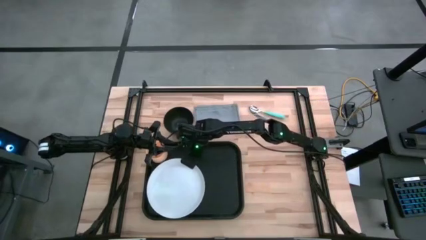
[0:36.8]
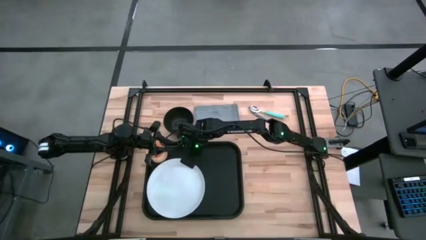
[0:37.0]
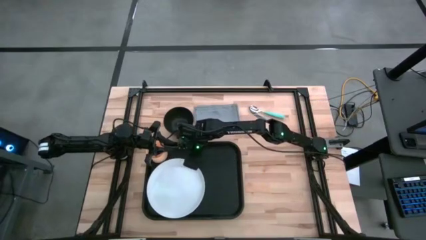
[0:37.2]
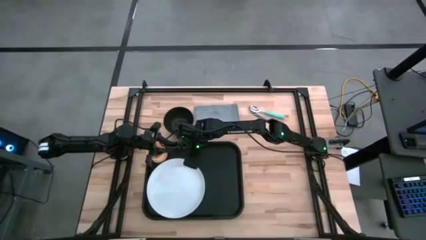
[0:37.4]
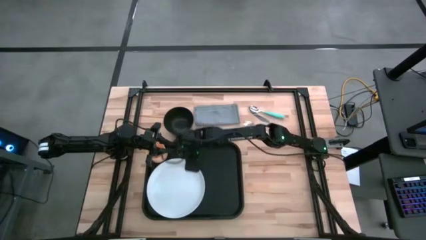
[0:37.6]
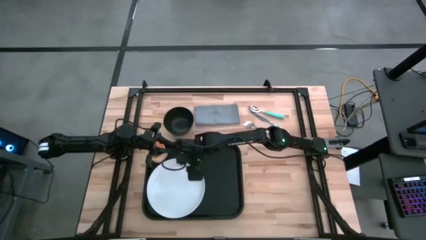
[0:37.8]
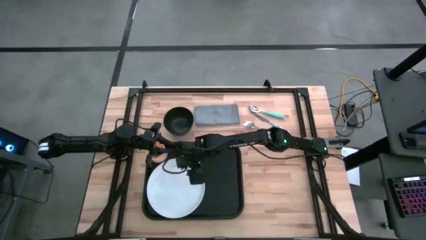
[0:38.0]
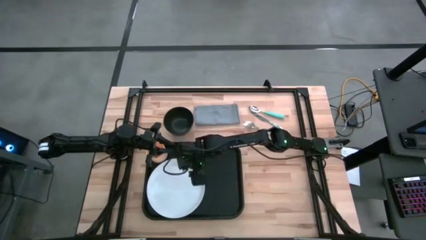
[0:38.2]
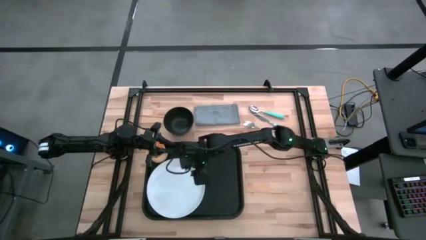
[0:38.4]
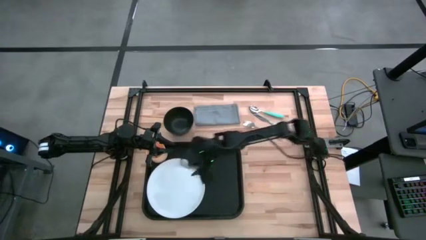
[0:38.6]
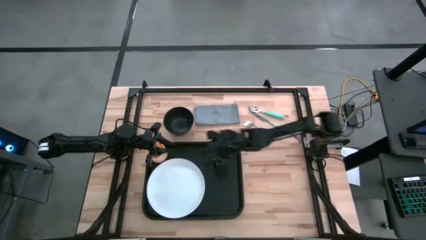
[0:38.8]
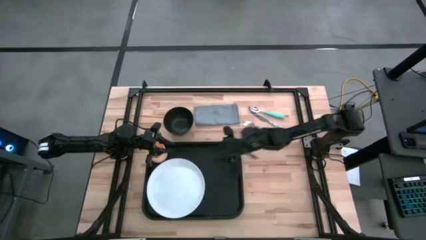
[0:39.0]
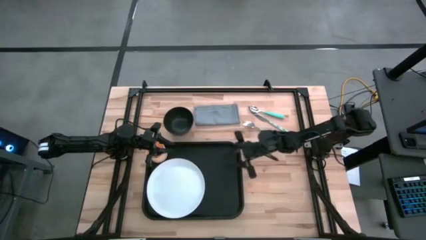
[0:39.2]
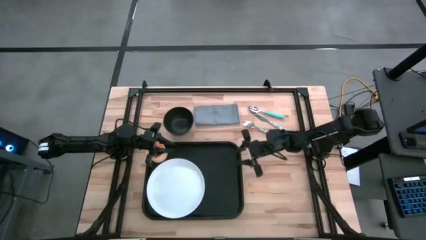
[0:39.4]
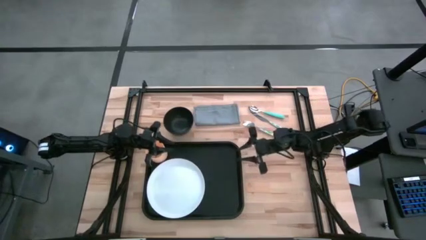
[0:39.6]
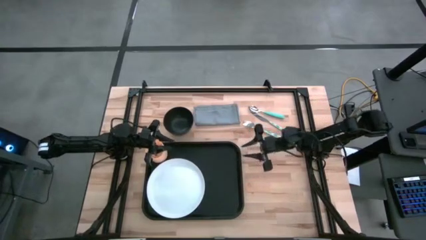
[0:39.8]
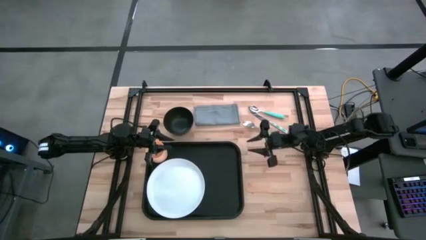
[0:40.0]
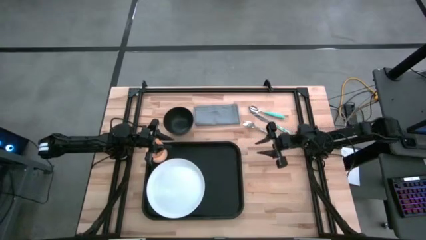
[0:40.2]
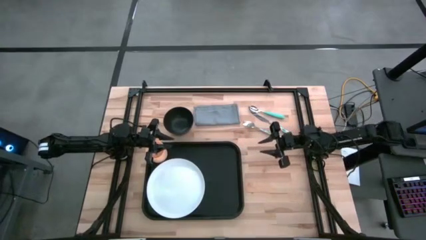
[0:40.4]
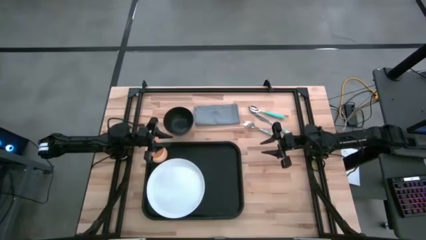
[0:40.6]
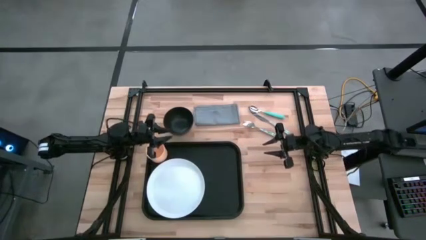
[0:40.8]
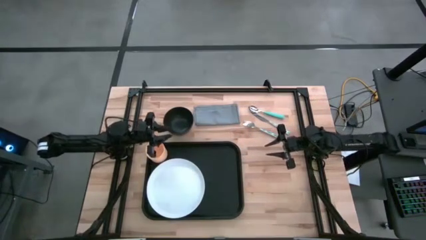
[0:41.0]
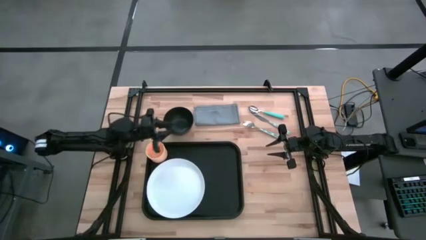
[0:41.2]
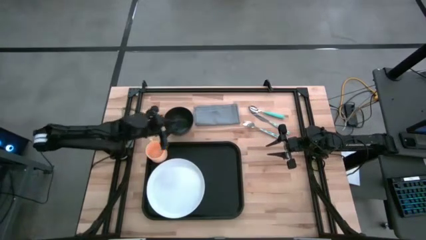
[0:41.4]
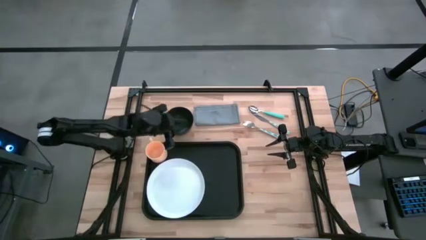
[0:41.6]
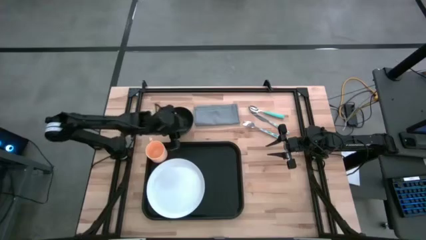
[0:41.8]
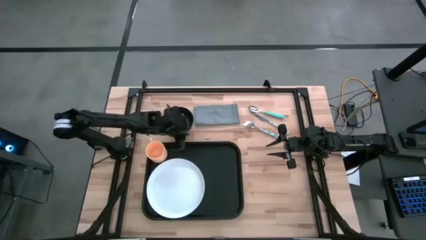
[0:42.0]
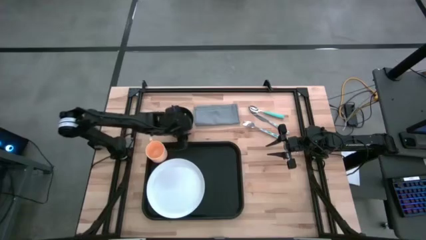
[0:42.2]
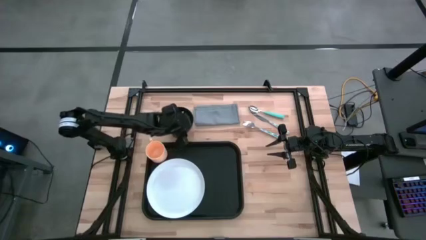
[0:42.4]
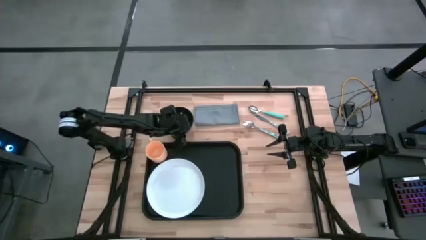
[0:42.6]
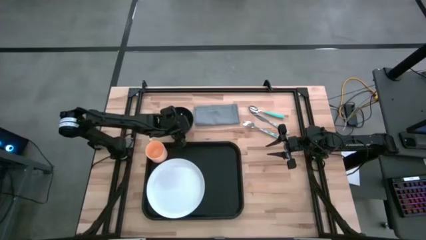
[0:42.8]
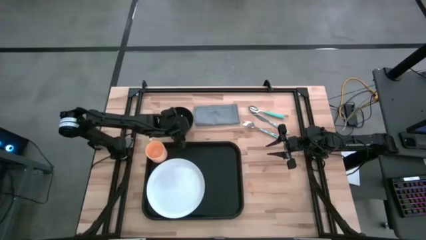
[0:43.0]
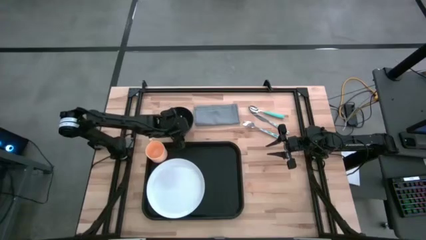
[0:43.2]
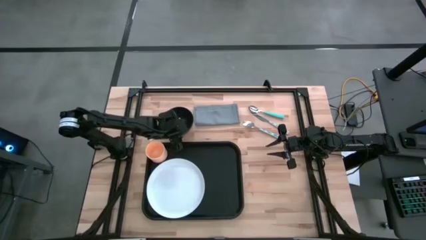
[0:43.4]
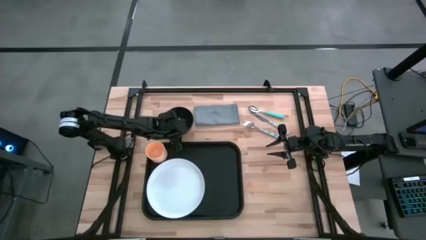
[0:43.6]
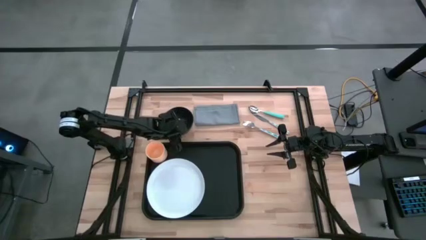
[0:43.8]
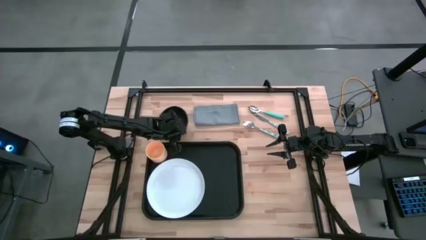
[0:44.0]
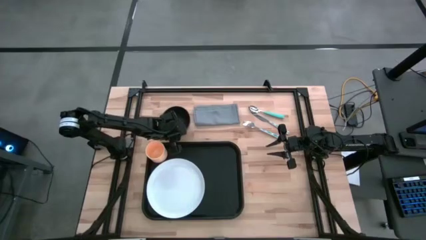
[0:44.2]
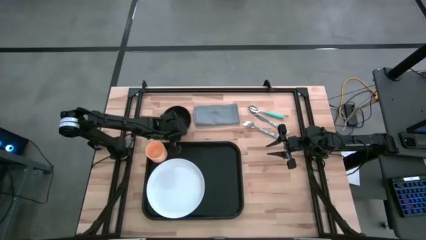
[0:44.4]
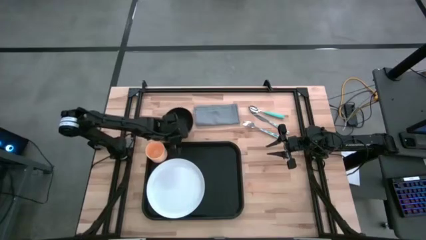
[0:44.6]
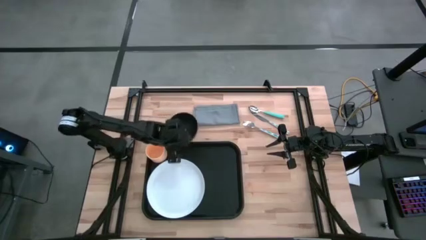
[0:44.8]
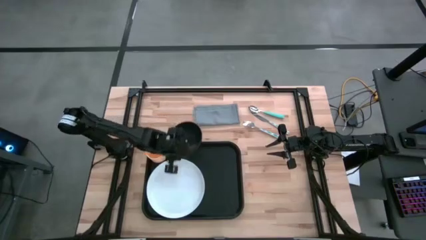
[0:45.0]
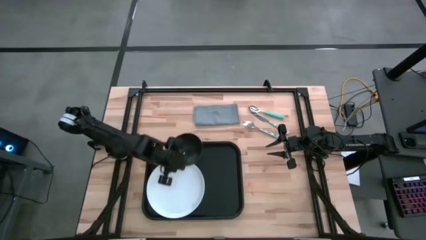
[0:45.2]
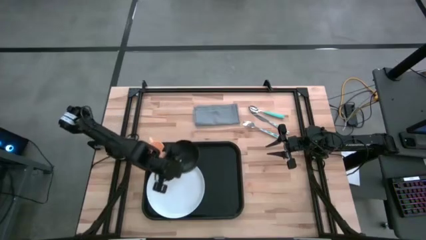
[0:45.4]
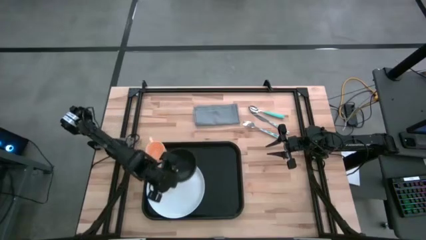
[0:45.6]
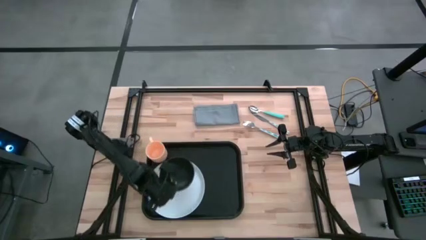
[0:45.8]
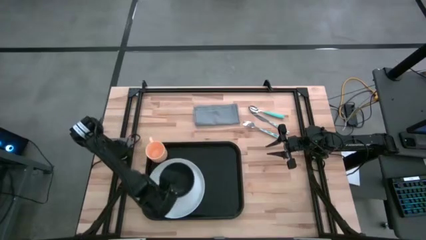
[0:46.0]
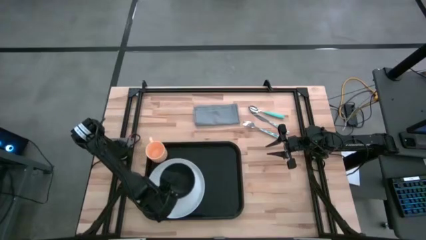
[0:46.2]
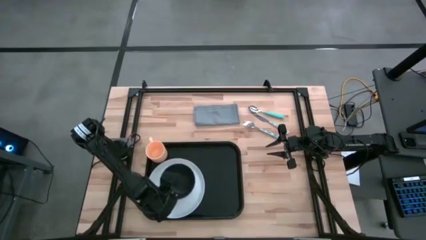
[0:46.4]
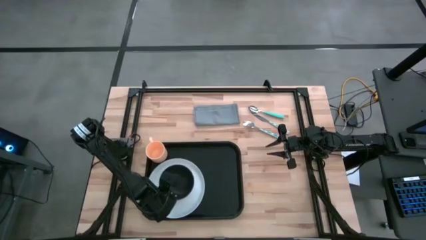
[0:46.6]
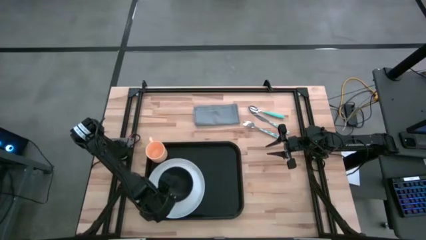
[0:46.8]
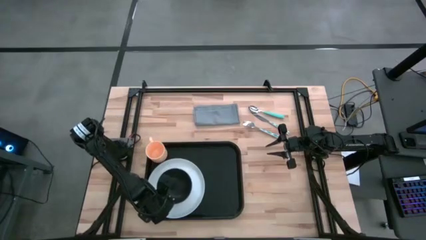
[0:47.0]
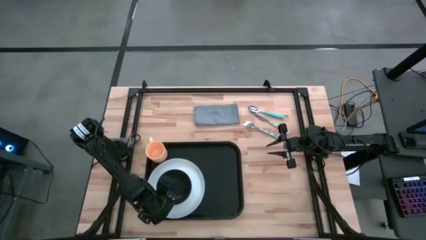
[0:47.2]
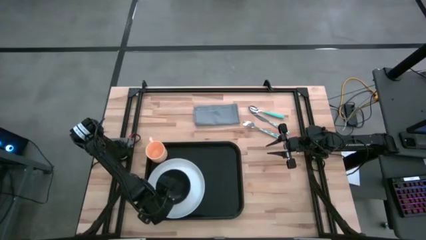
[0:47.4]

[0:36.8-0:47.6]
Task: Set up tray
Put the black bowl on the white plate on the black tray
